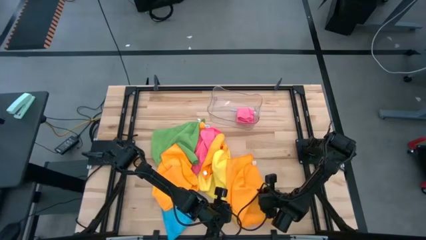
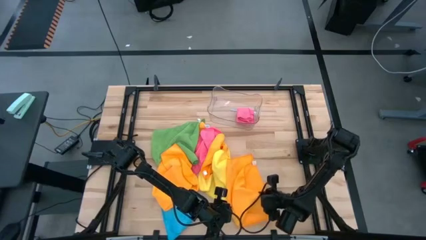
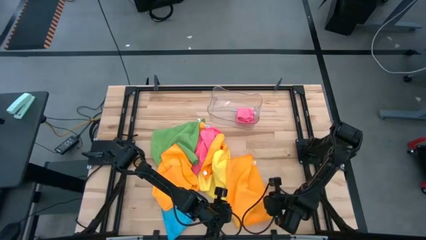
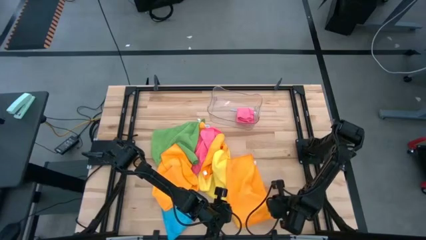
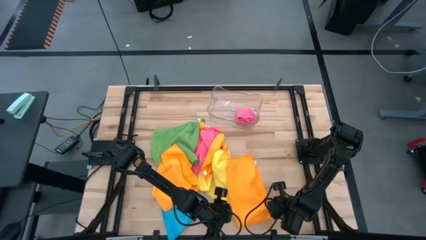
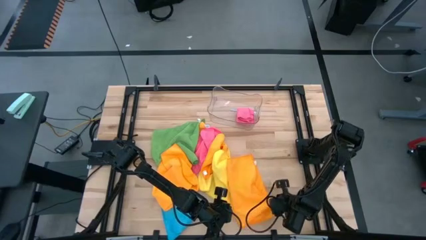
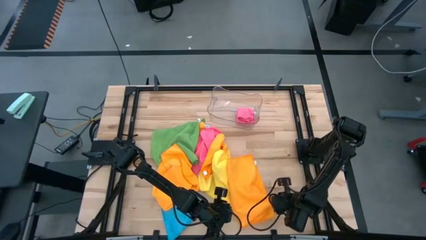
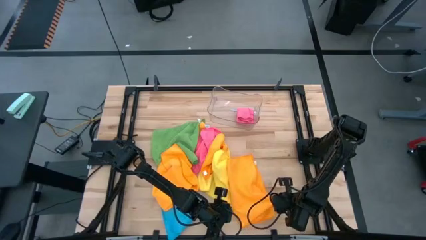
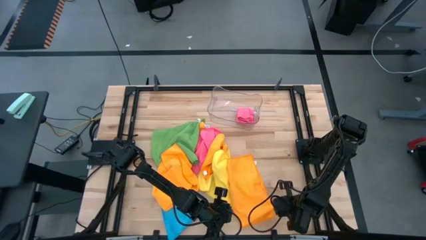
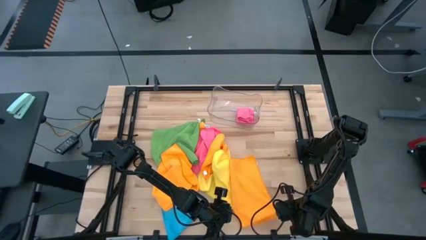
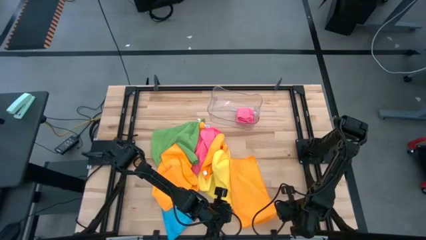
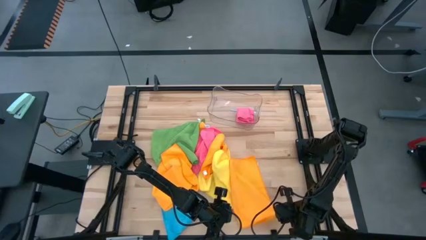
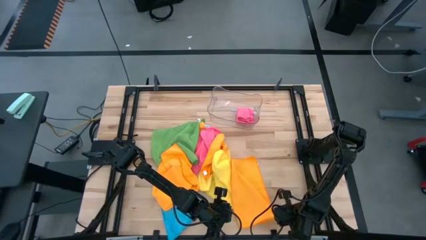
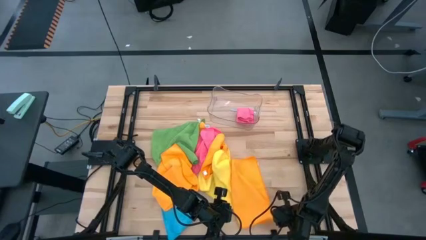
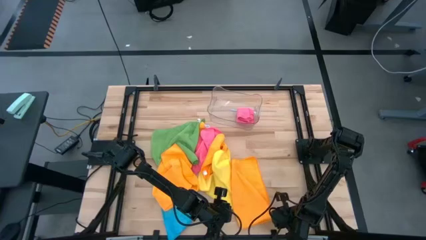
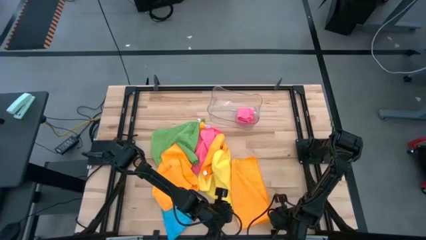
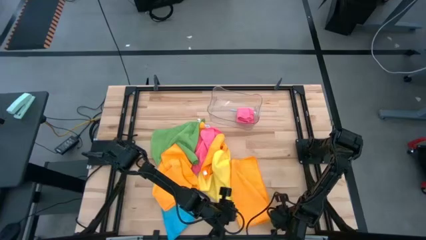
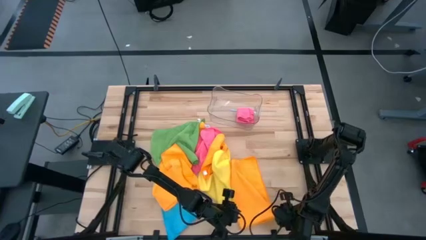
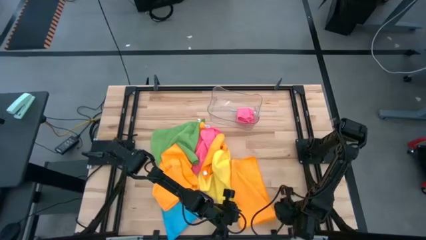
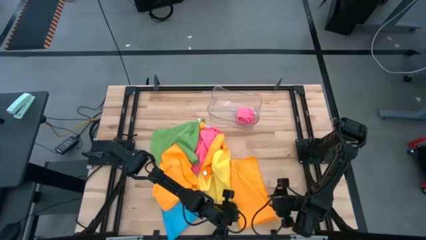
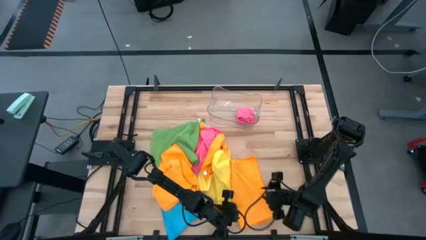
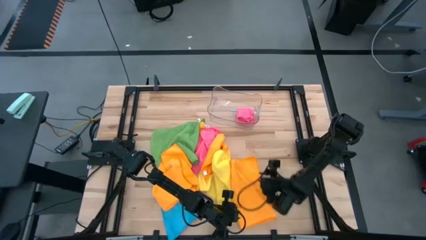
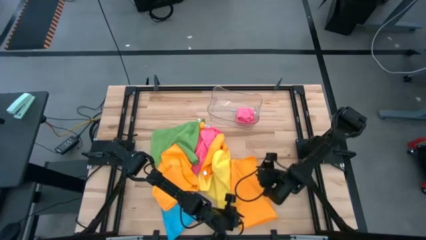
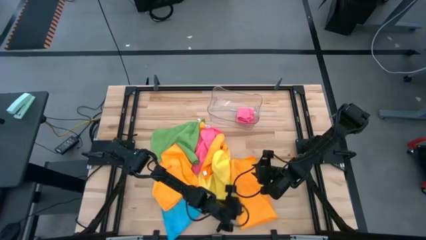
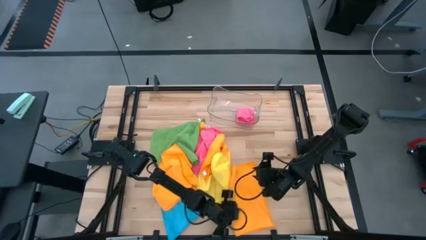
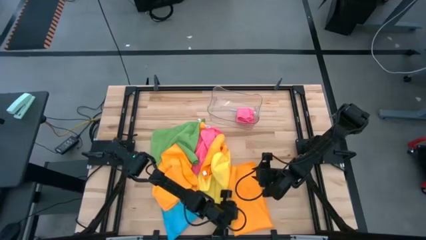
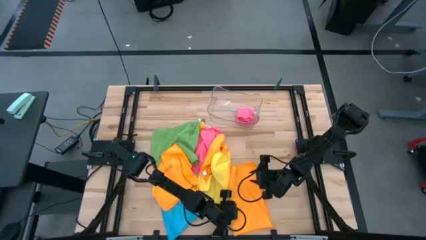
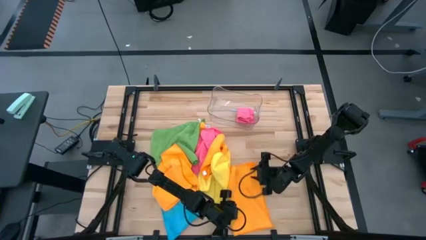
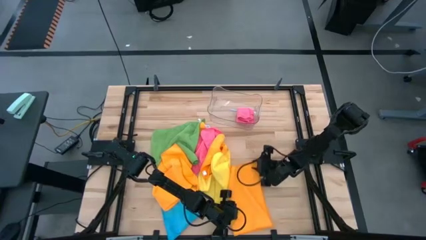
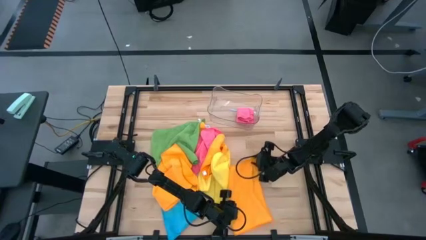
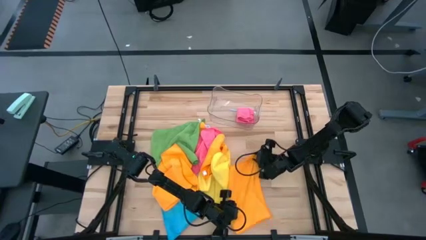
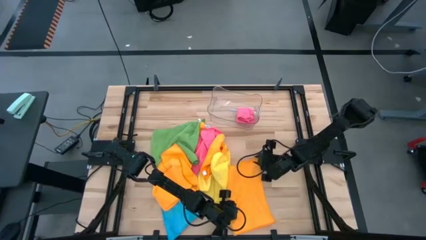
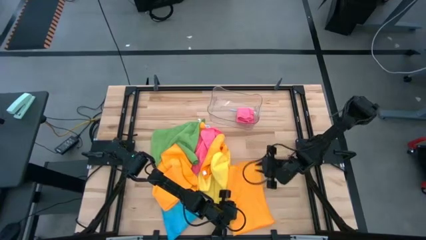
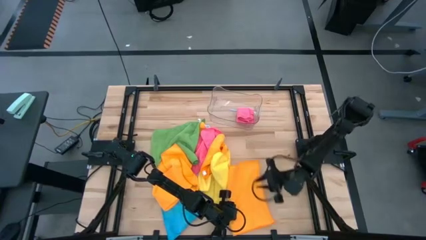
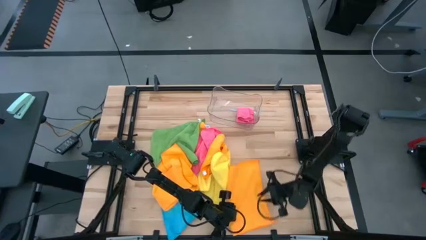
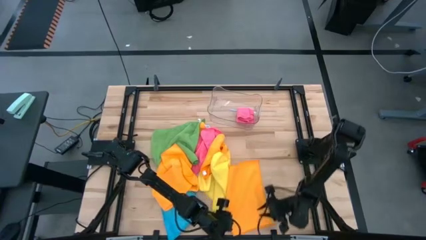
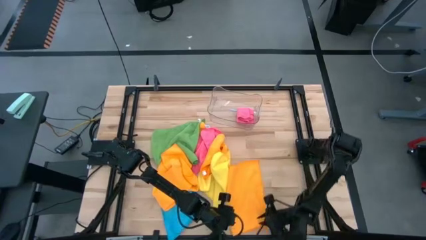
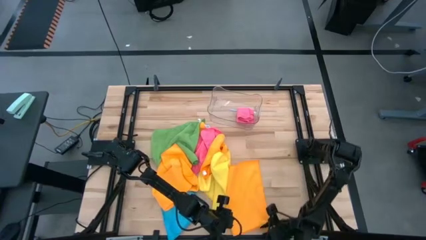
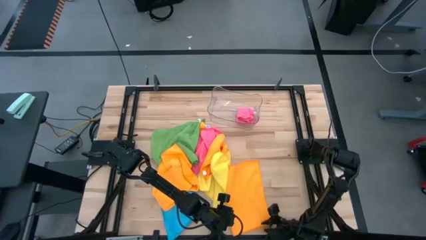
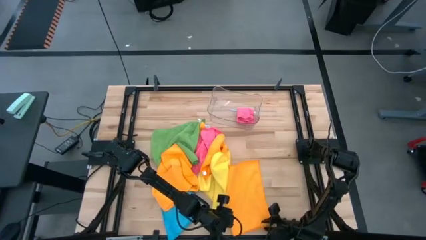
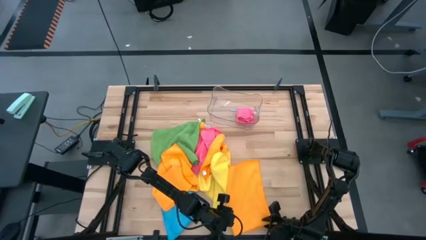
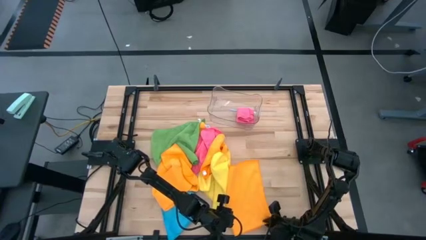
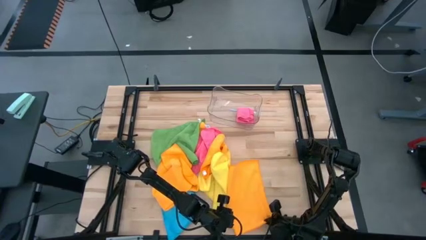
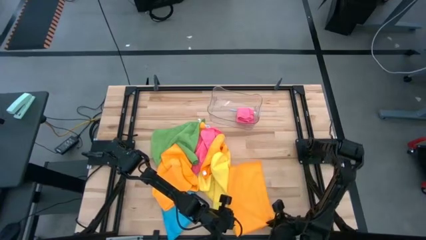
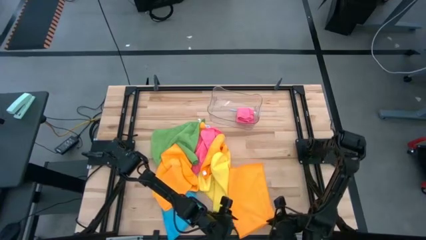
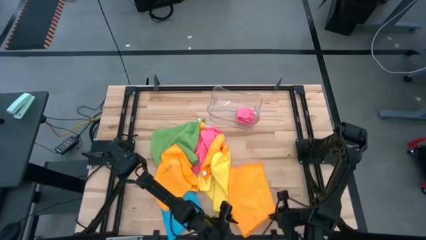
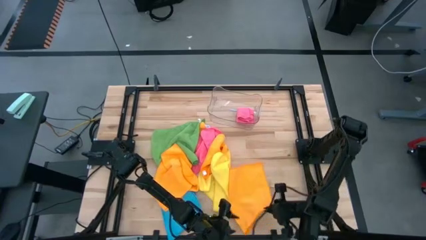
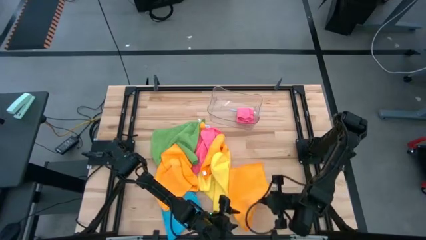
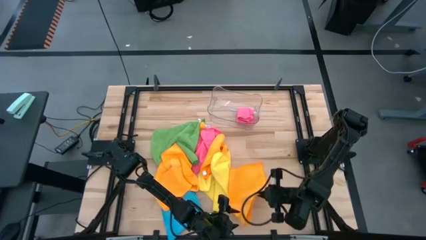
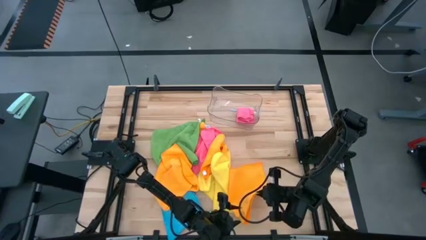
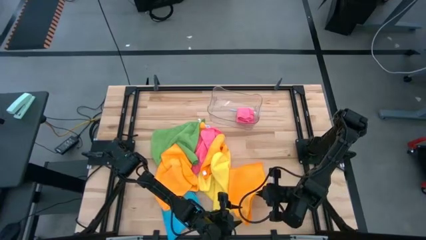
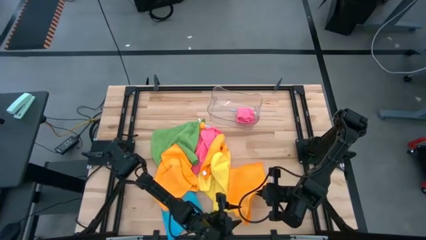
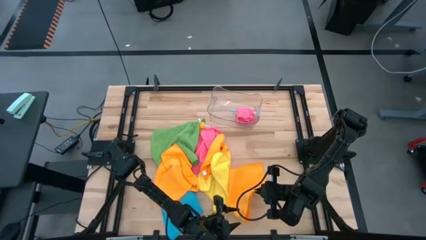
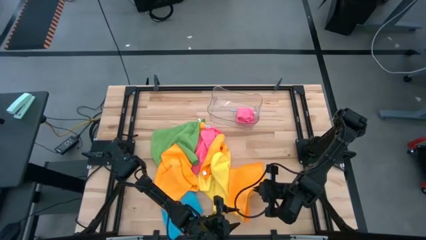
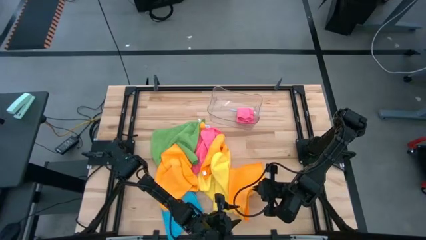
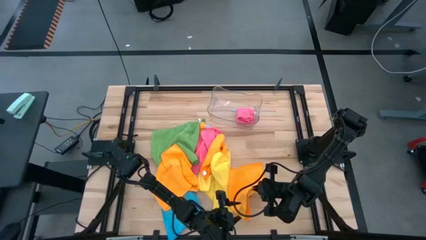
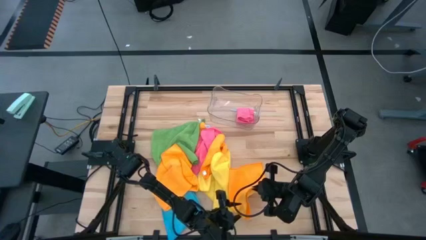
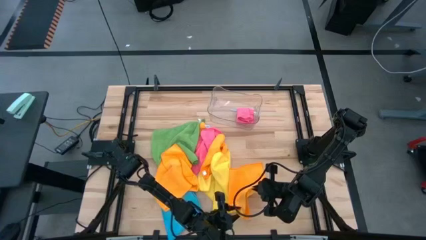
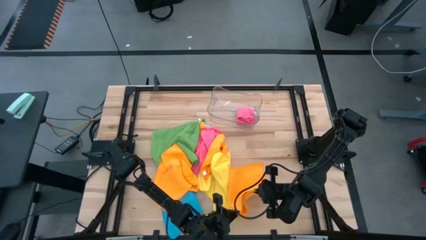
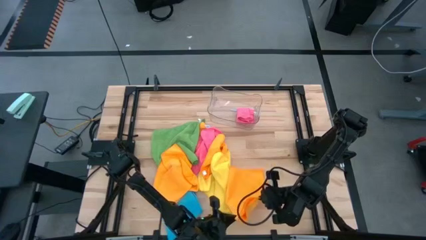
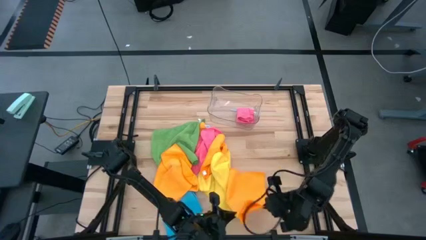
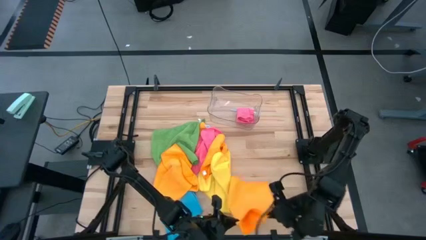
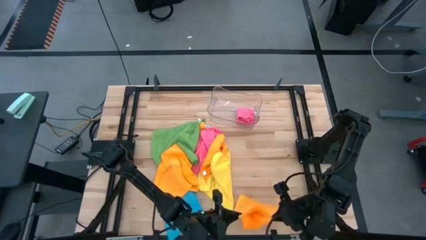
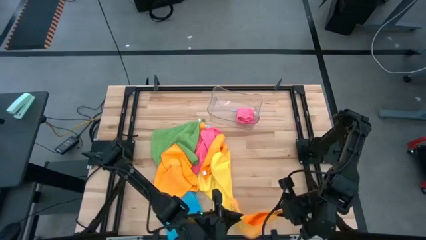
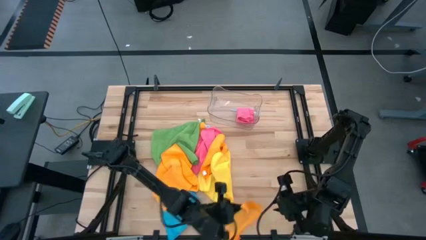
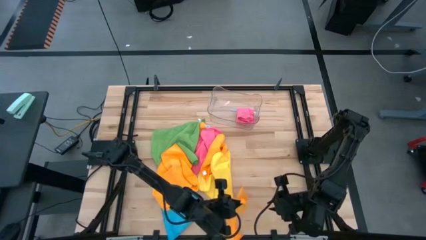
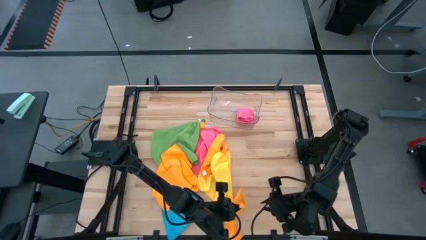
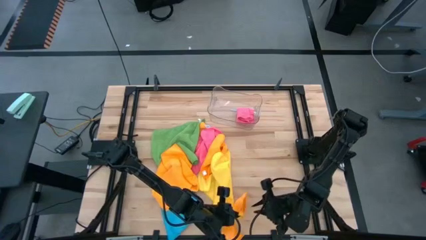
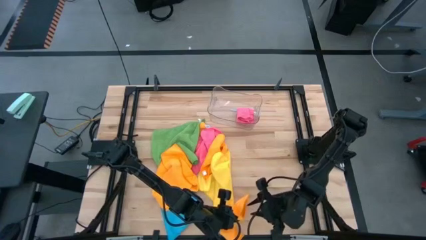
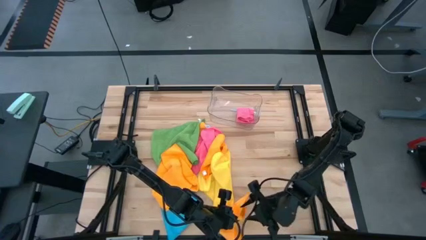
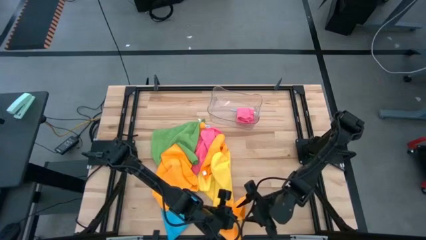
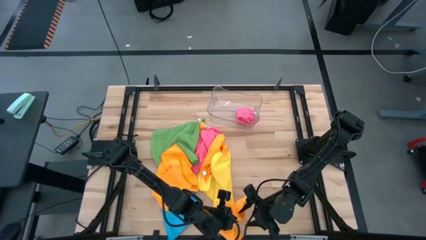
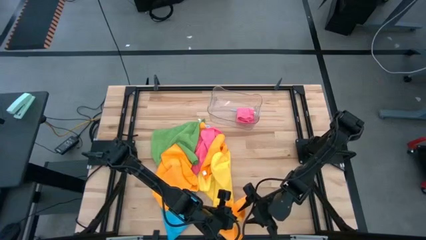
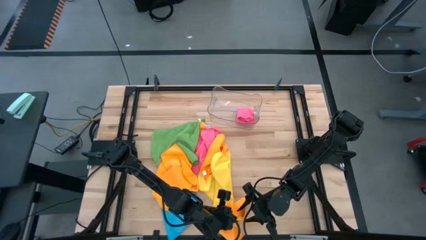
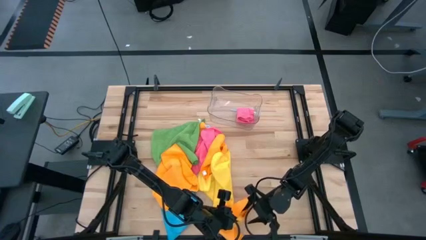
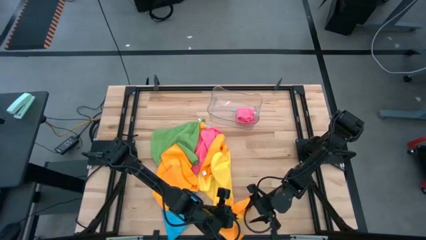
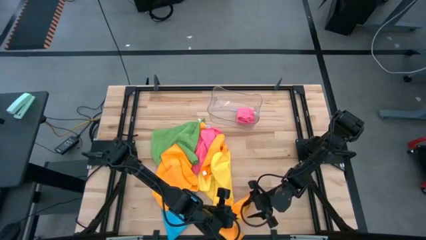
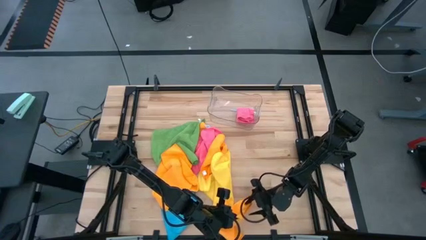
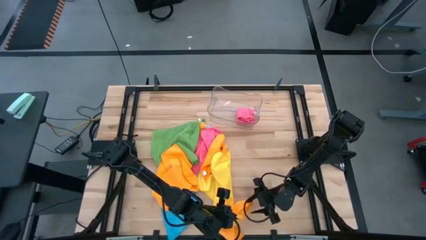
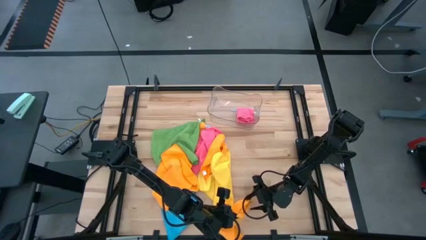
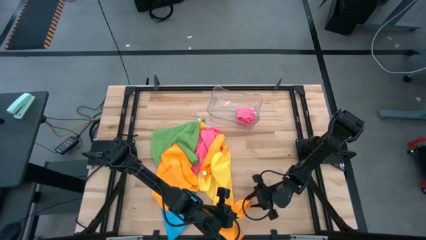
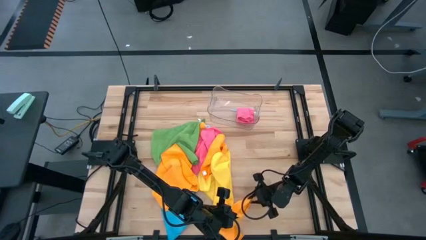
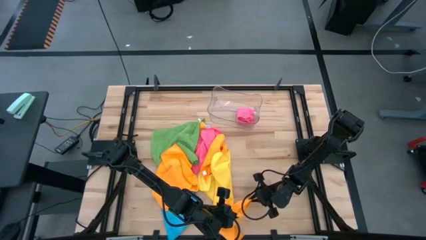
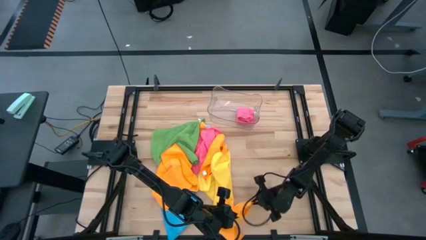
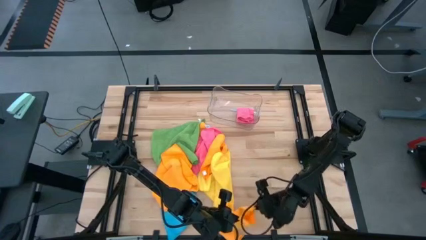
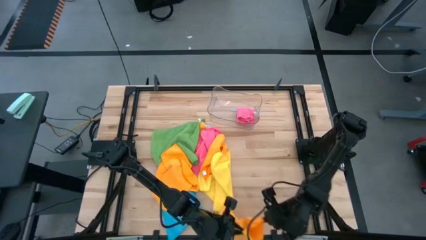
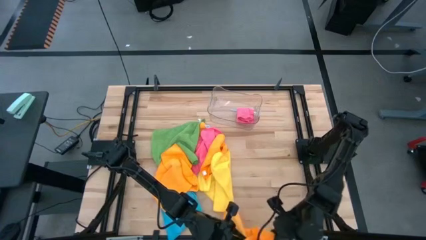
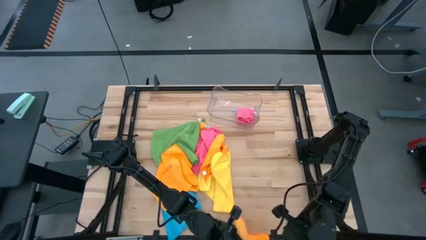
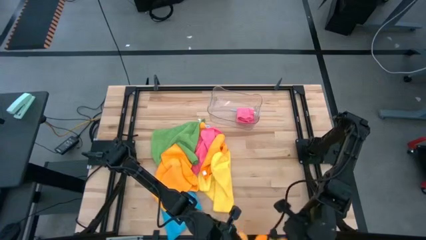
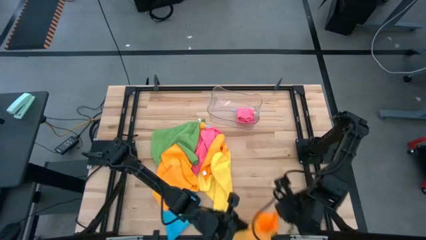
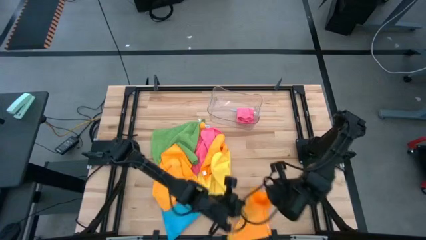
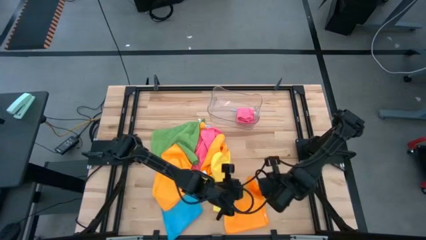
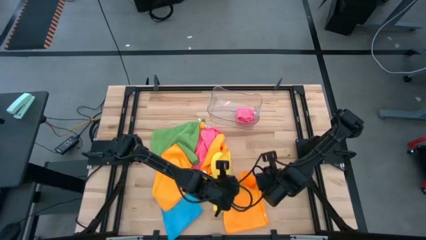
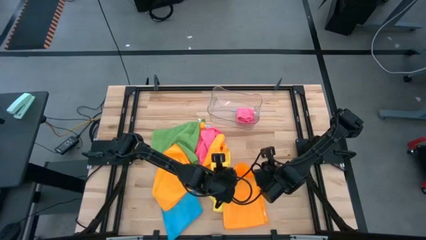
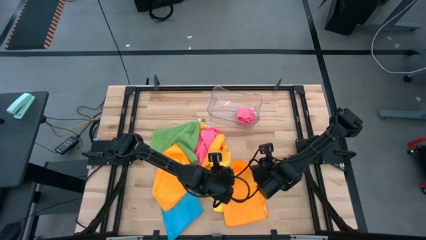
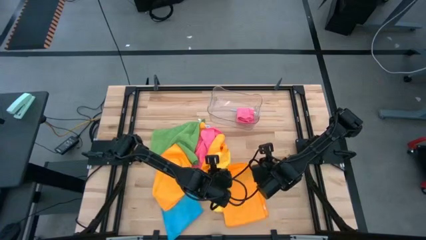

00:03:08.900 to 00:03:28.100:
Task: Fold microfiber towels
Fold the right orange microfiber cloth
